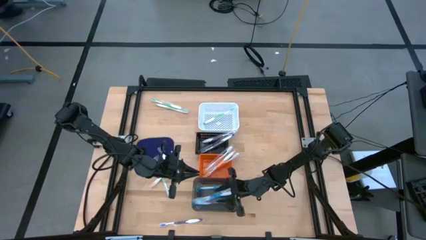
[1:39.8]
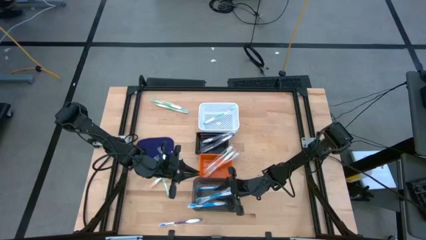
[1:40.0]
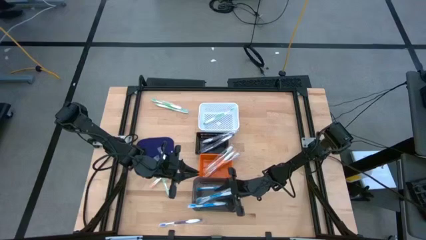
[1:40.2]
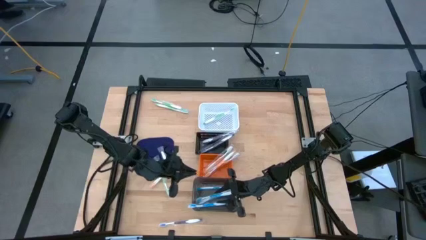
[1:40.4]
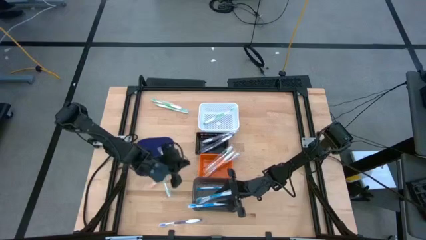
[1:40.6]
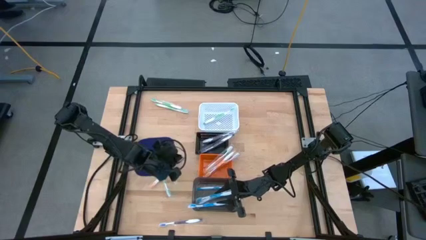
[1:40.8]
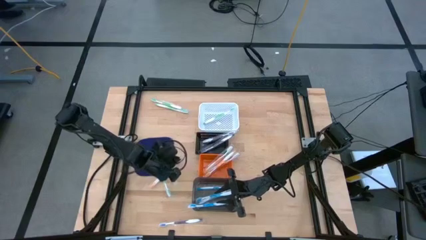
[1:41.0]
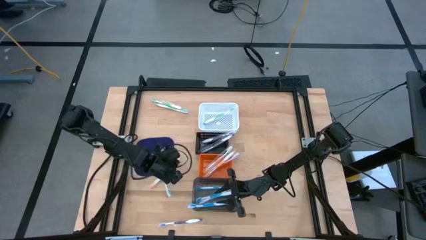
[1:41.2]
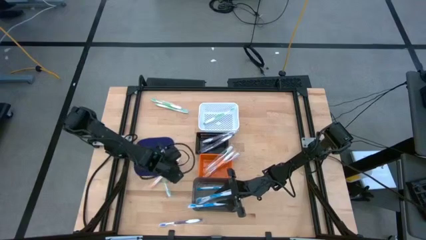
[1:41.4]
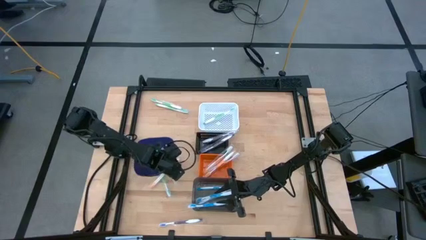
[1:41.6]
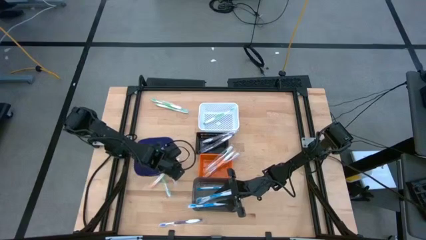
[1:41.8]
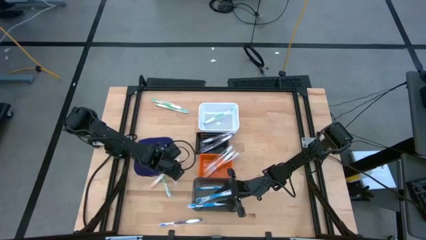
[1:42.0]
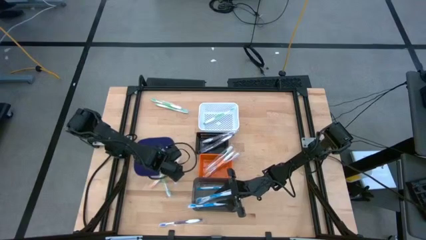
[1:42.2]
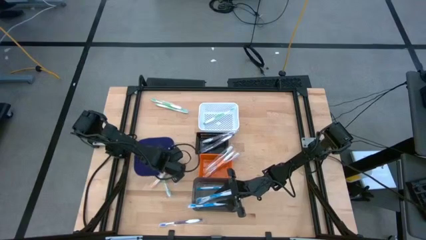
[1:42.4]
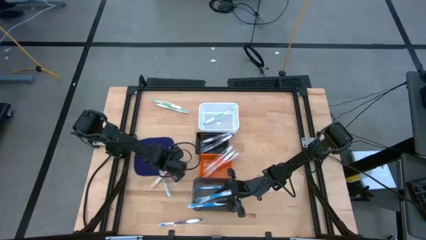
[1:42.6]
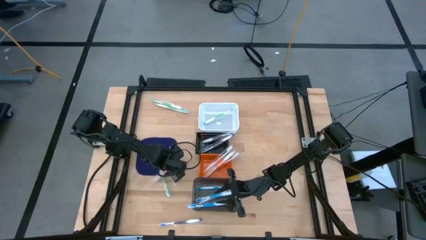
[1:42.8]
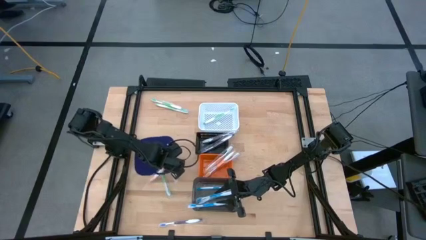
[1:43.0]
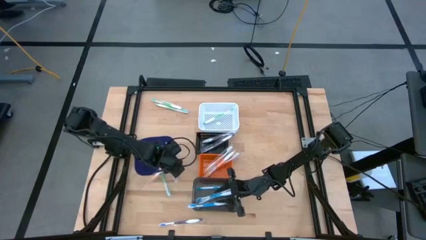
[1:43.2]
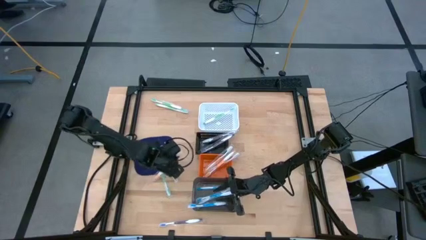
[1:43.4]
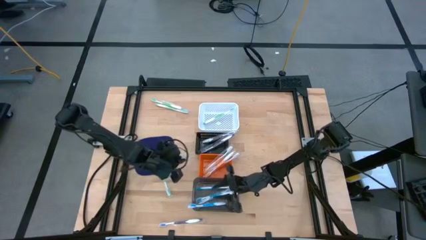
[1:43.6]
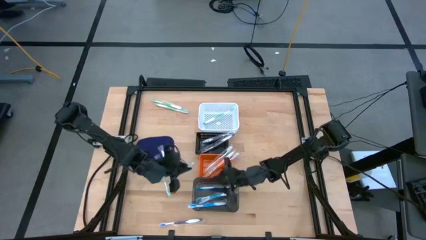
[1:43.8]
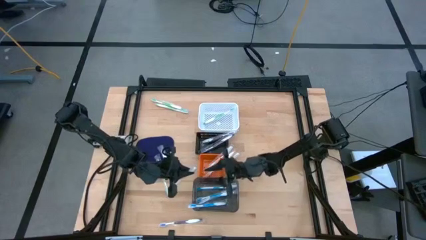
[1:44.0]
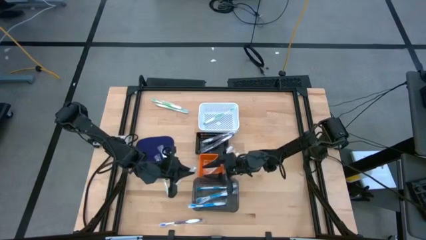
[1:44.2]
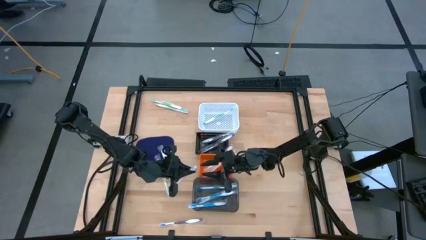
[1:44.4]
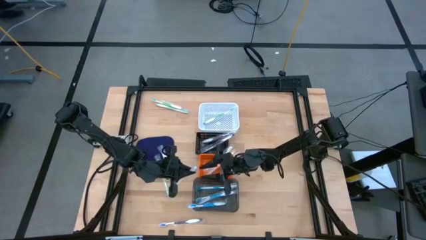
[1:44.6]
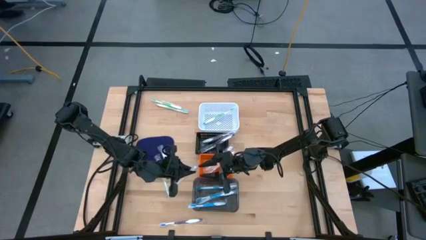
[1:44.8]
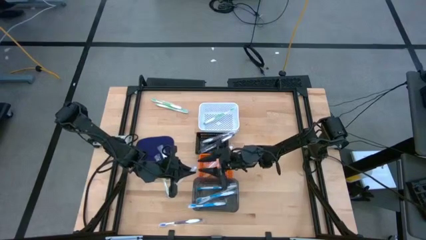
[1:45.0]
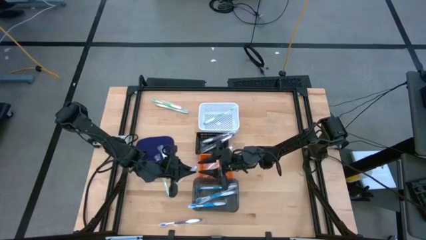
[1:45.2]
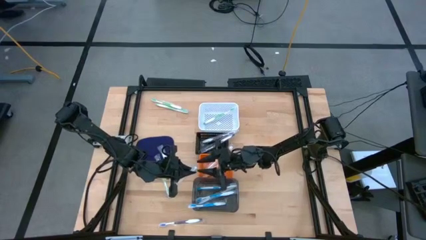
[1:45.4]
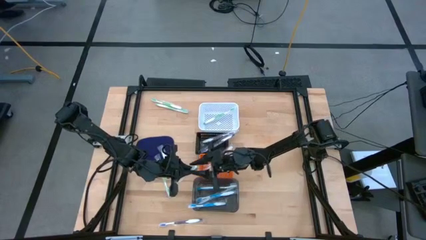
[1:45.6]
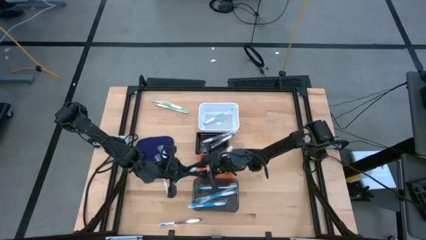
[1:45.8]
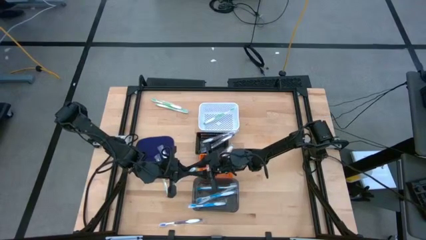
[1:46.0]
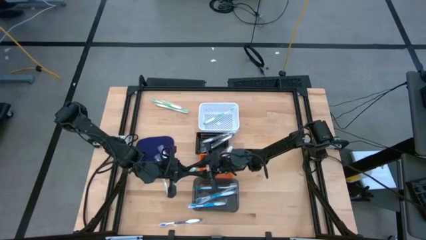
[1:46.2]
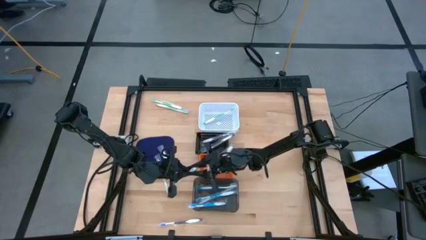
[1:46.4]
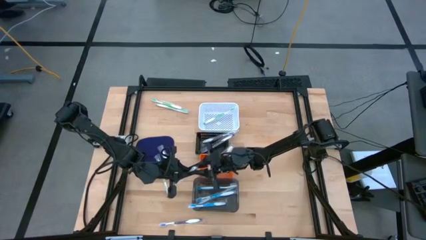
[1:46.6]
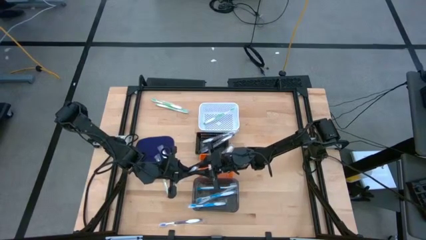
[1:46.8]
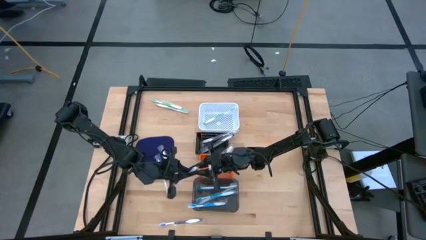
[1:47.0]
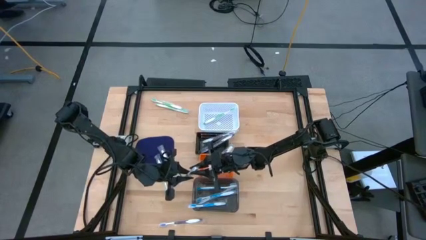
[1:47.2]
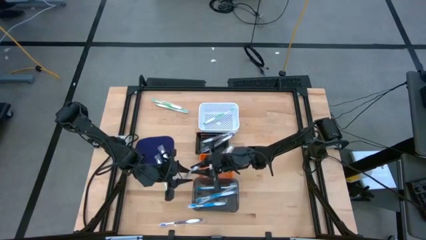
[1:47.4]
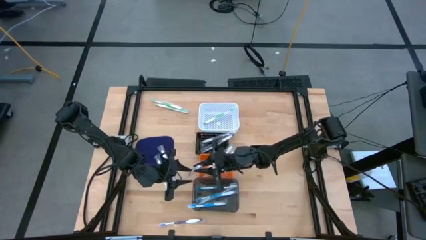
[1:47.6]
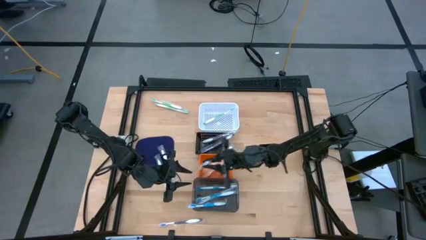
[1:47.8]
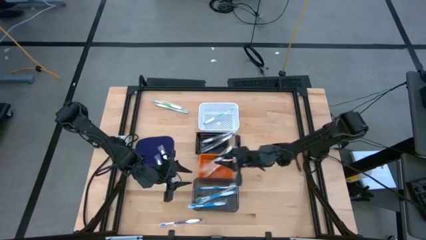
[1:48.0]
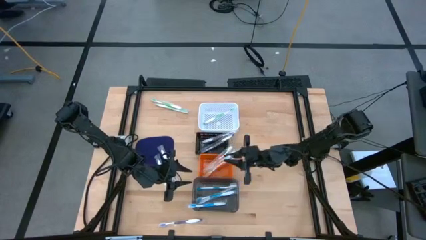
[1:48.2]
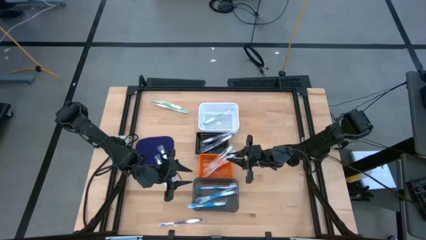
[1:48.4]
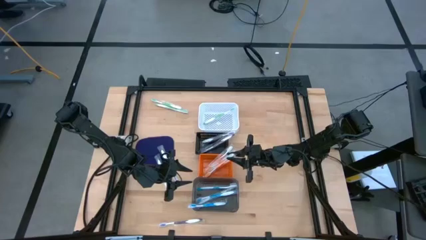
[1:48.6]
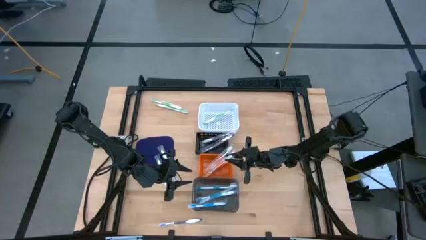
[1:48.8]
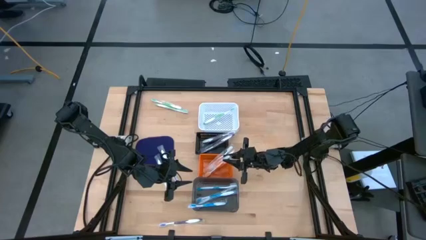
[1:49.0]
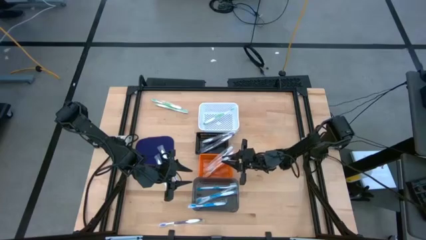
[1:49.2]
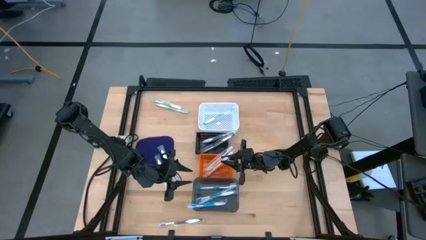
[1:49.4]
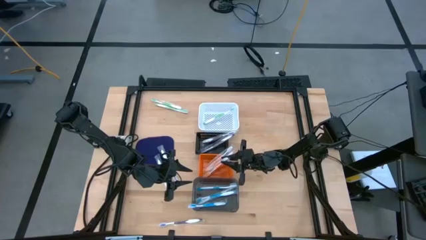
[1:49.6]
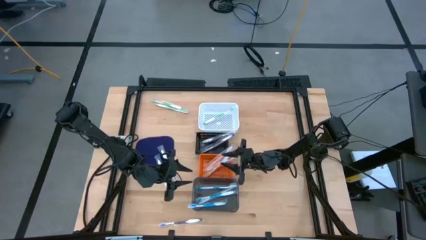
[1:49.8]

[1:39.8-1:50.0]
Task: Pick & Place Toothbrushes
Put the orange toothbrush into the orange bin

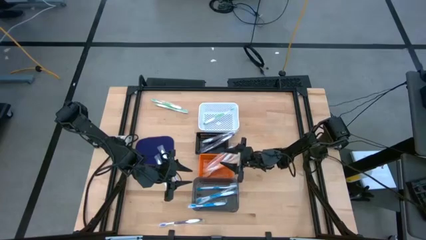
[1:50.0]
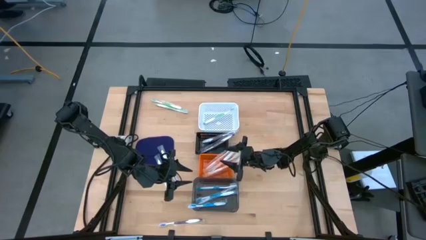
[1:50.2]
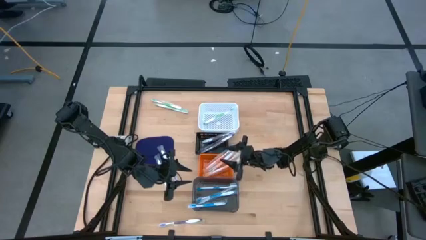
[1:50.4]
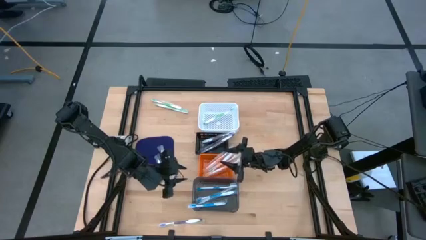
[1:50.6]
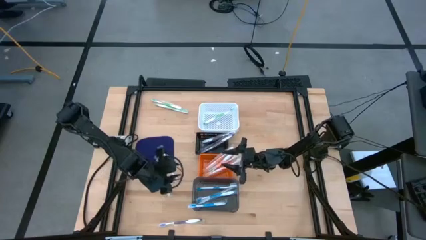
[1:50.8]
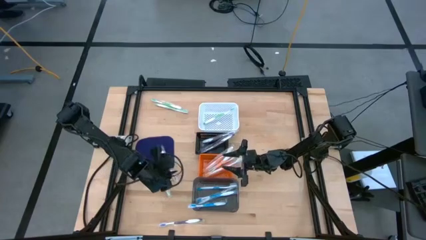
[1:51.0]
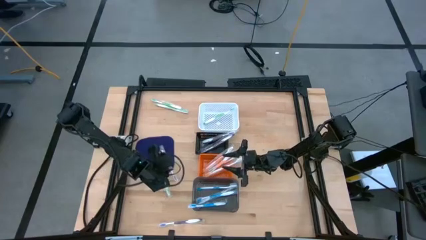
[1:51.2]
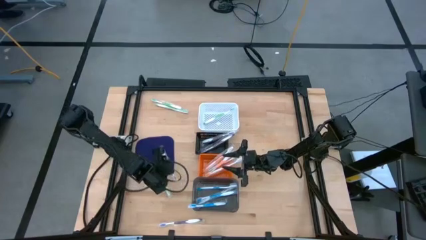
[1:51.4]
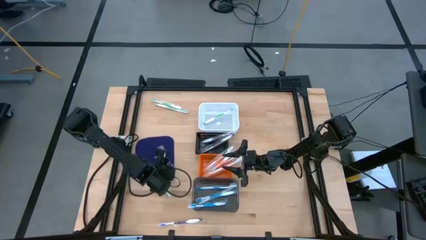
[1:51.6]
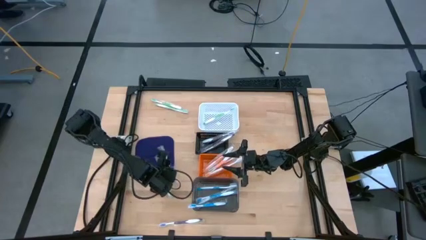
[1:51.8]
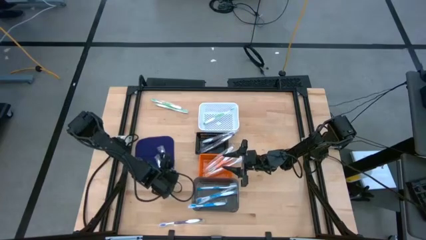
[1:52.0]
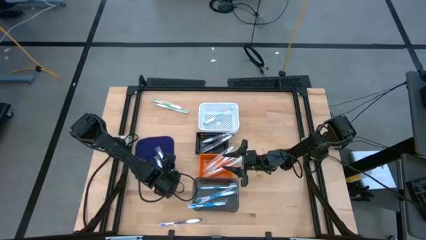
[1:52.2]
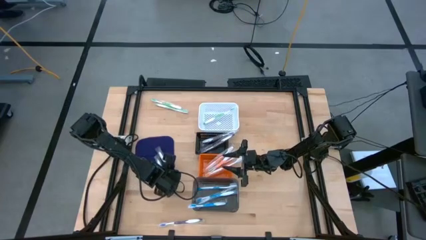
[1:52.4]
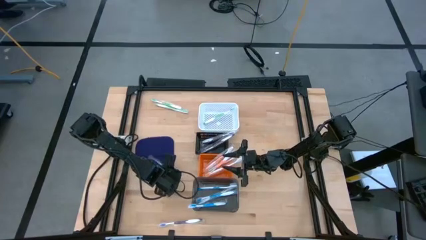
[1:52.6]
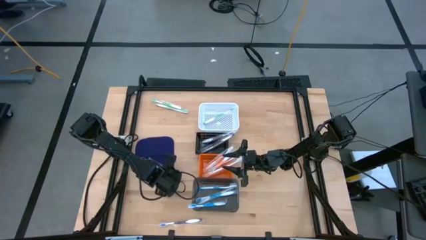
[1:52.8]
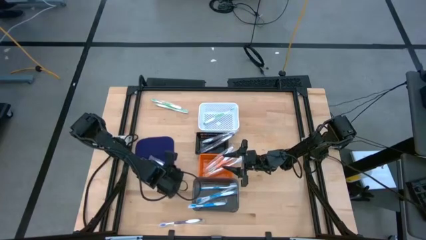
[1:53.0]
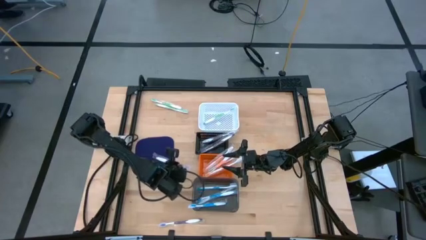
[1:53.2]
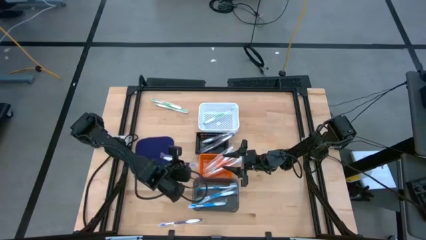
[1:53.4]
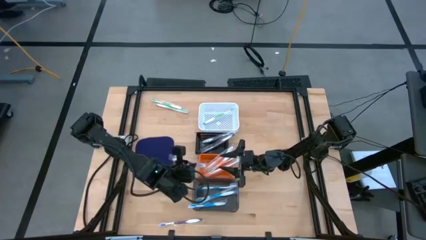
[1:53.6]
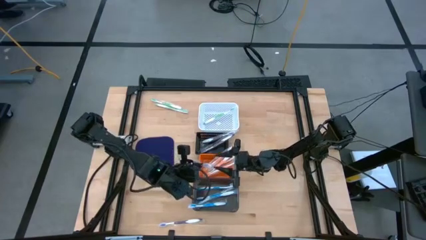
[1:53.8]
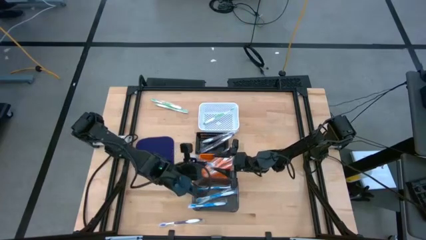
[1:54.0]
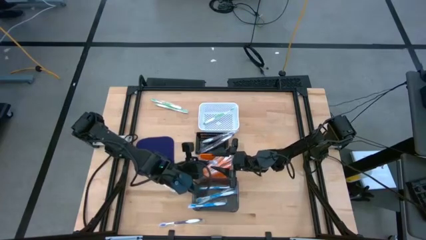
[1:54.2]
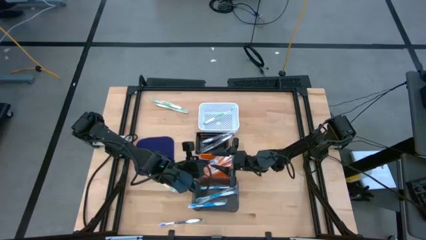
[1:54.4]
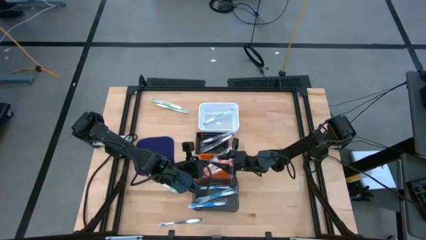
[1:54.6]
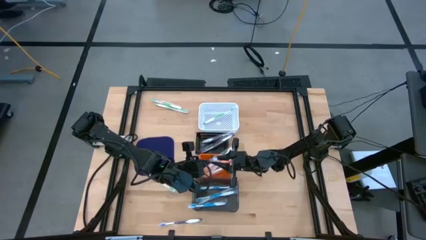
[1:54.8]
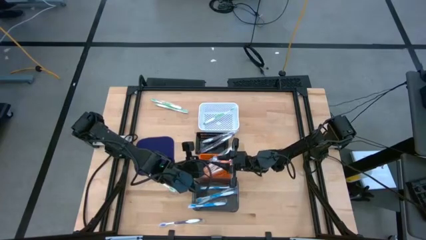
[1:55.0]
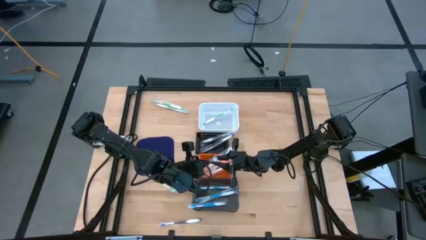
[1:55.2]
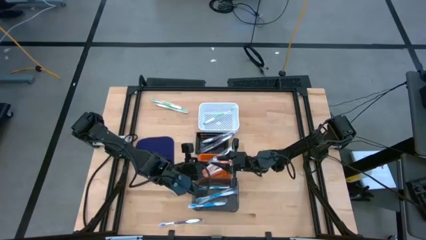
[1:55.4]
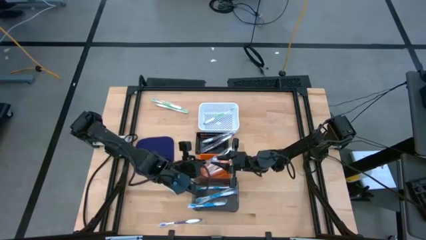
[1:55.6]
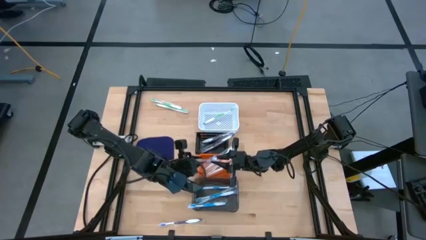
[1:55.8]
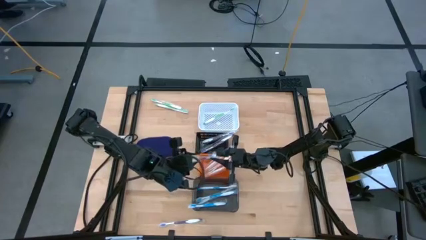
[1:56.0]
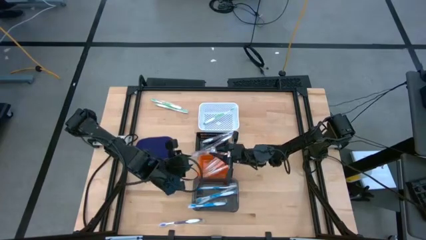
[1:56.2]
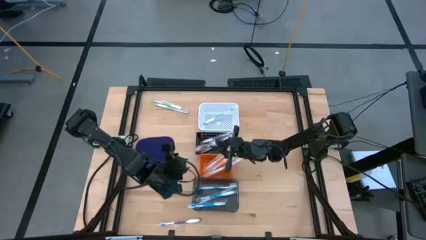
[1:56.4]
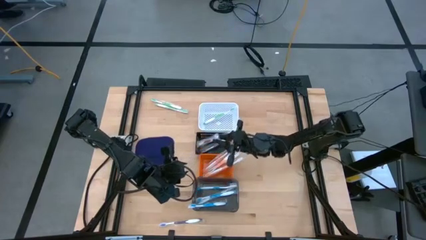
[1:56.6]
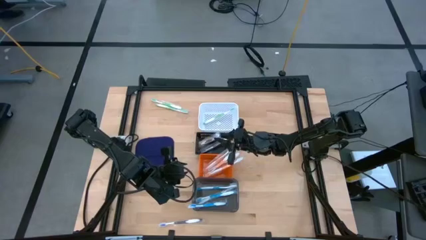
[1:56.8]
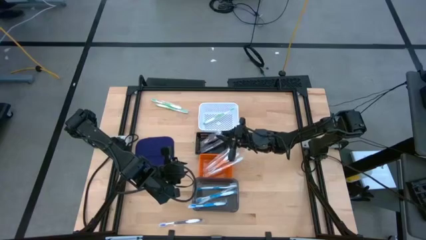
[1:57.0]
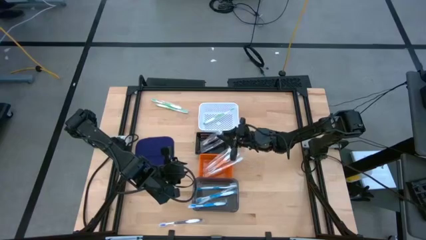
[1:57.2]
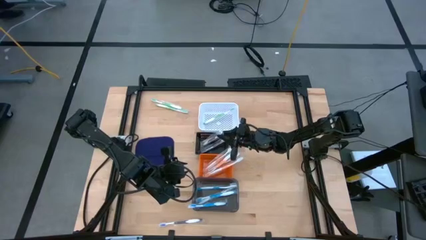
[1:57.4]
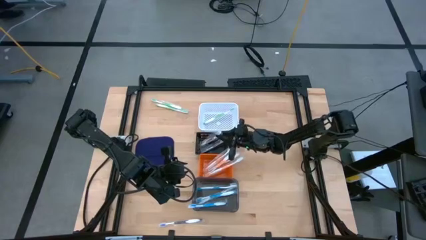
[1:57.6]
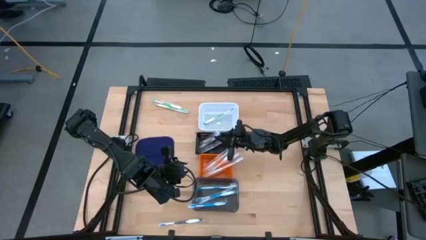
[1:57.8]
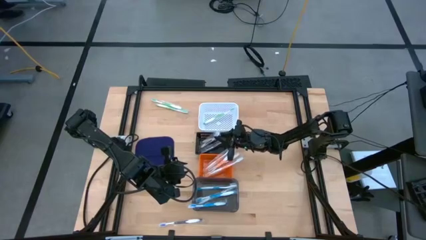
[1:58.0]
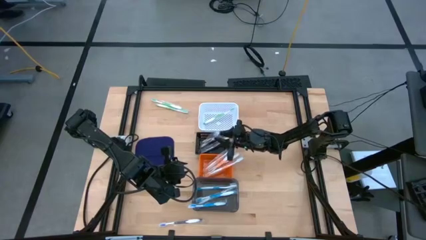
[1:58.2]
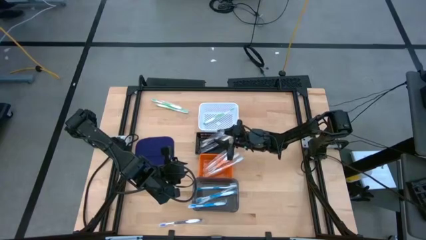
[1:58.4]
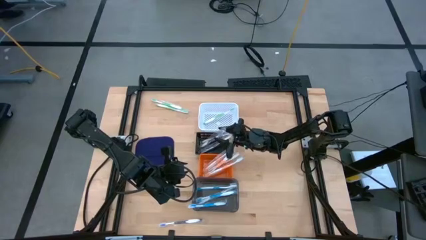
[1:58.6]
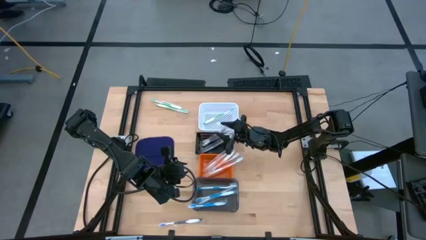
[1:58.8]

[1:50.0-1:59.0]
Put the top violet toothbrush into the black bin
